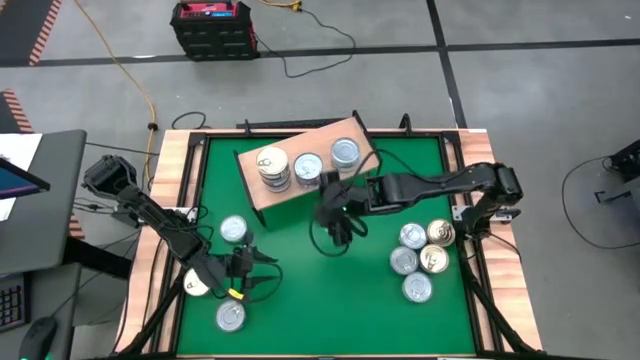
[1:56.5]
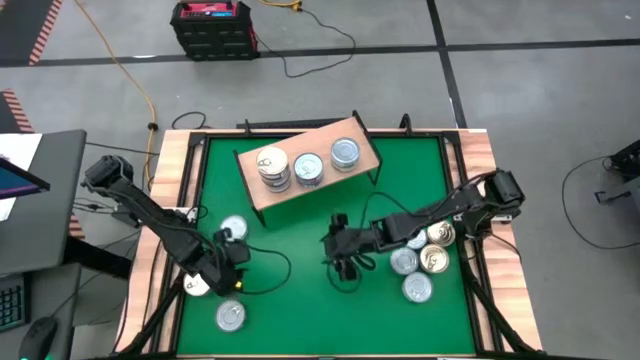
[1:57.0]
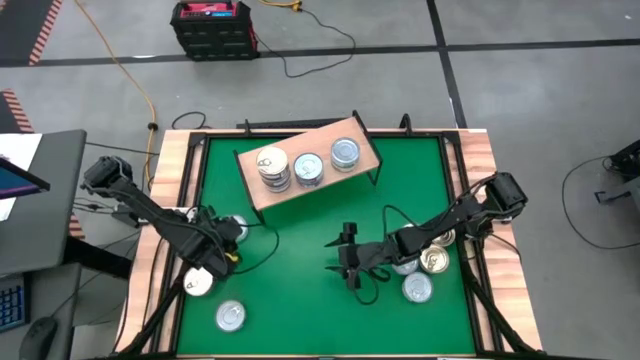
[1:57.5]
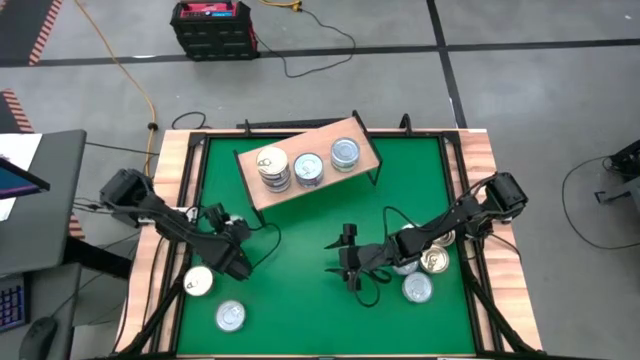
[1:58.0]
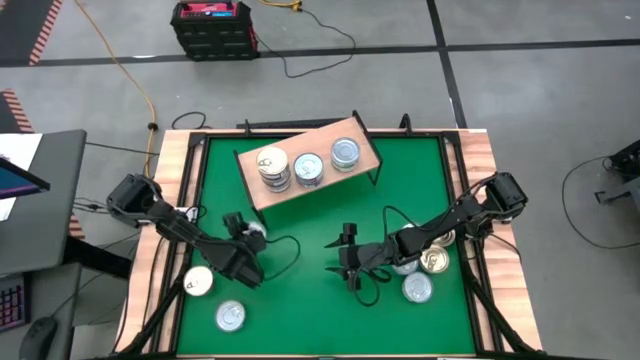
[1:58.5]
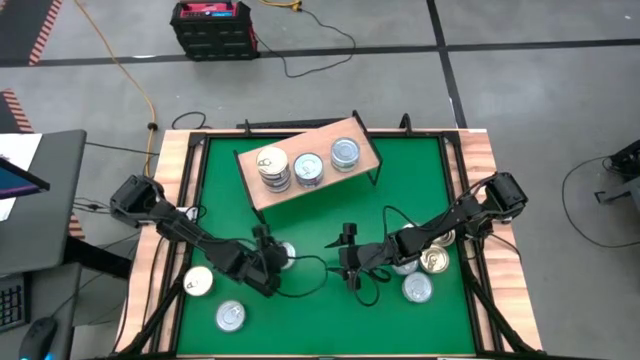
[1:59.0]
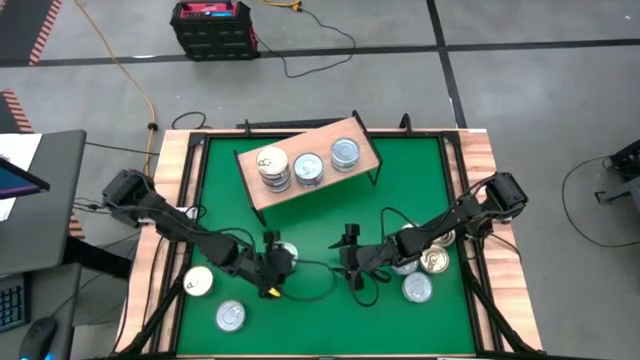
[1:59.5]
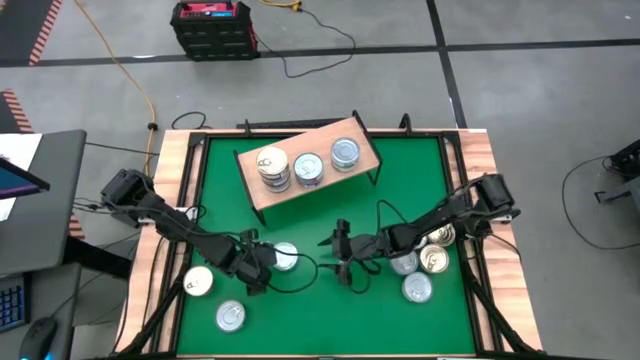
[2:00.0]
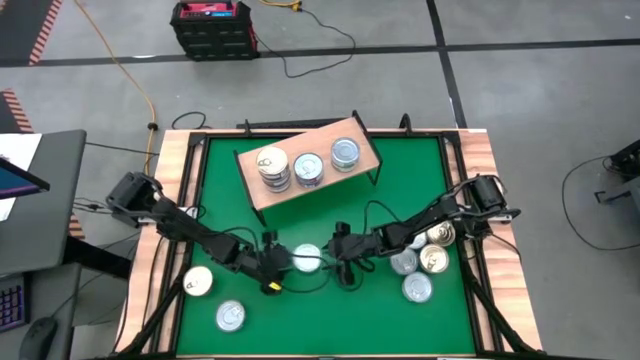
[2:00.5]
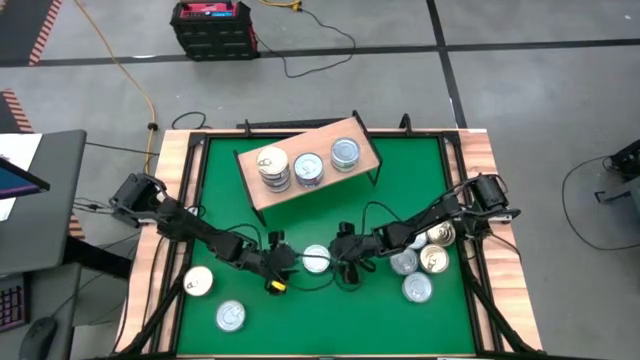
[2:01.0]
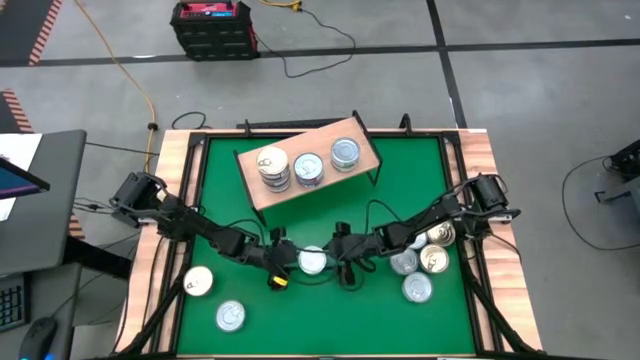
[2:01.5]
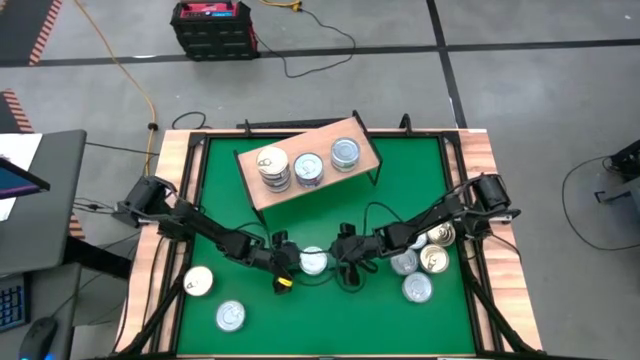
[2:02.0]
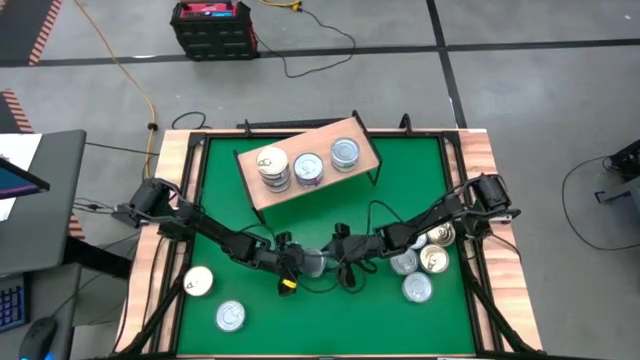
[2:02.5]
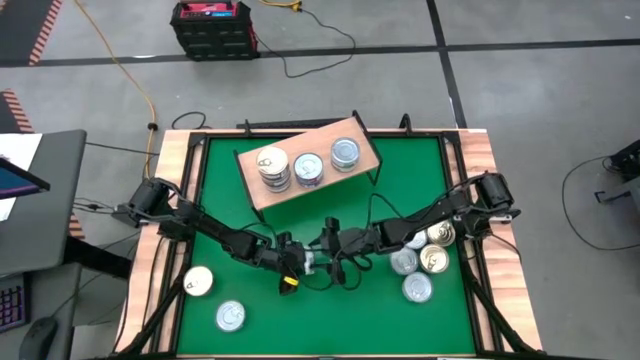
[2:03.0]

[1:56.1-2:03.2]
Task: Stack canned seafood by type on shelf
Stack the green white tuna can on top of the green white tuna can on the shelf

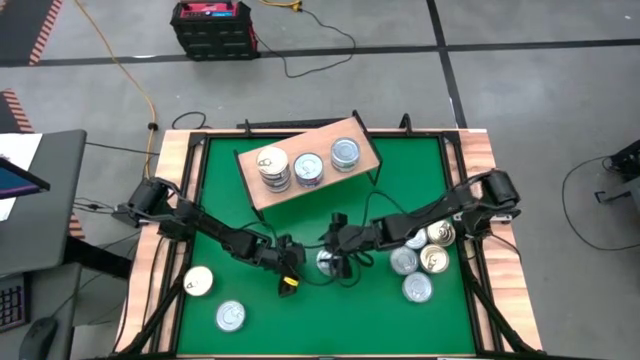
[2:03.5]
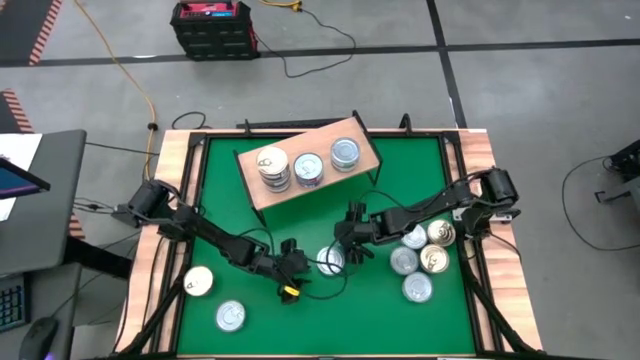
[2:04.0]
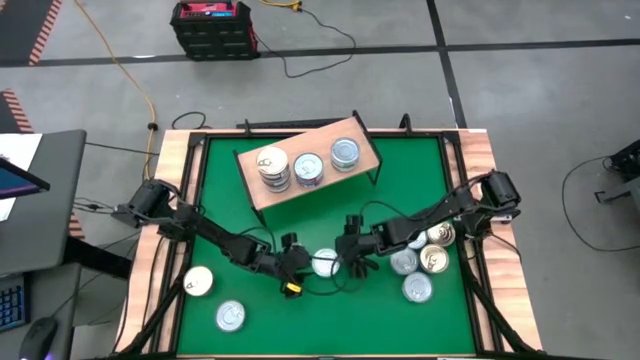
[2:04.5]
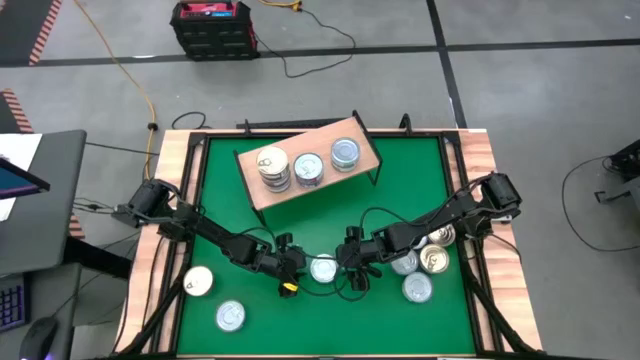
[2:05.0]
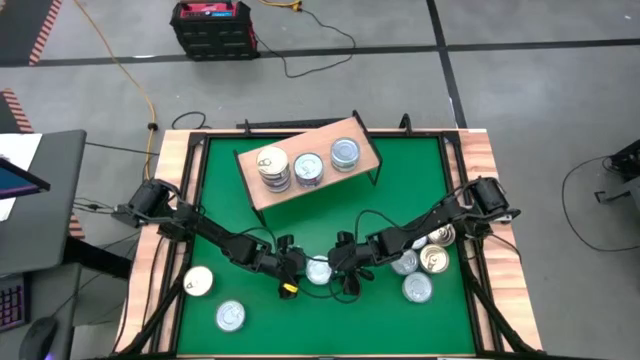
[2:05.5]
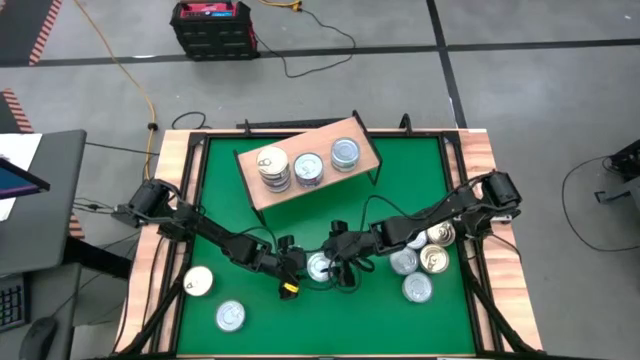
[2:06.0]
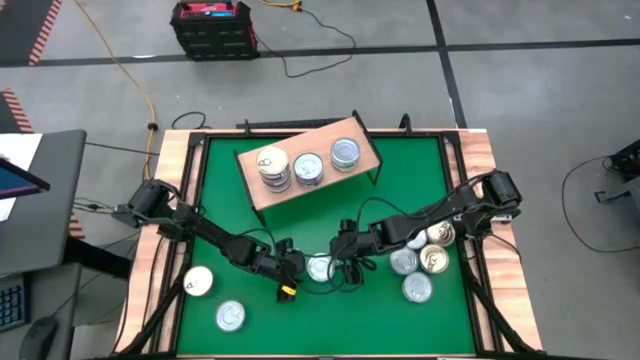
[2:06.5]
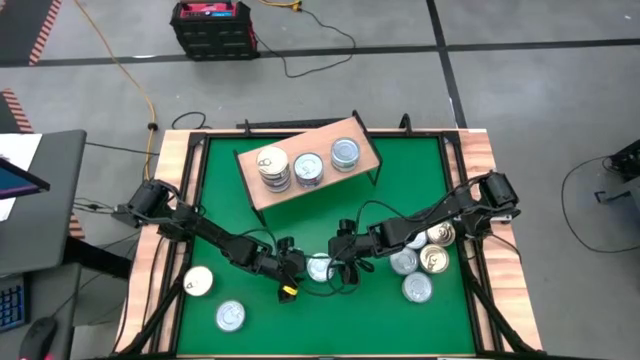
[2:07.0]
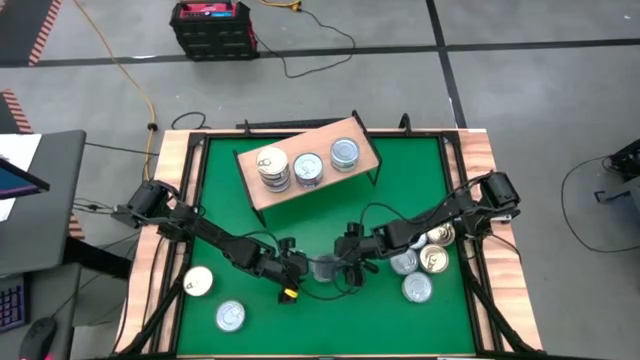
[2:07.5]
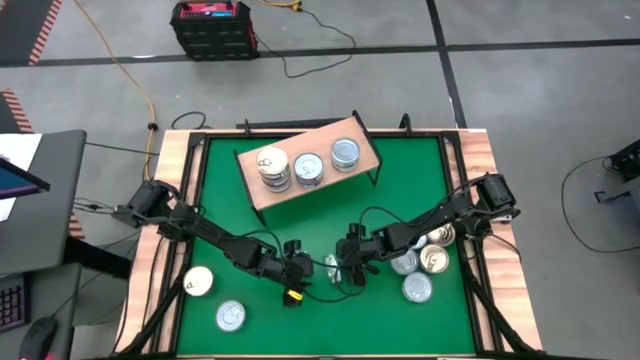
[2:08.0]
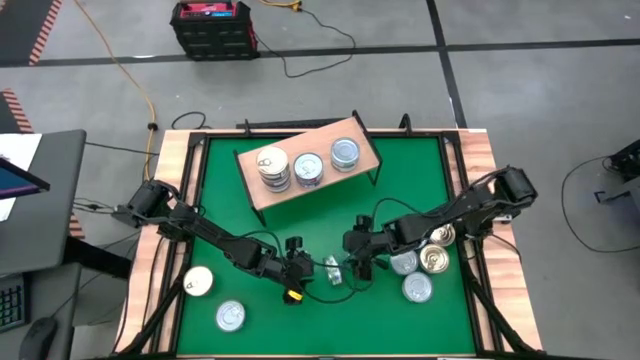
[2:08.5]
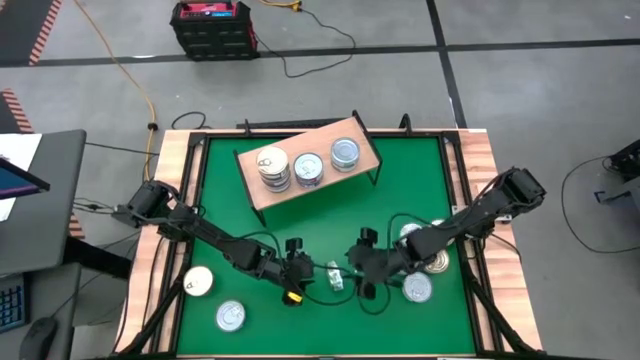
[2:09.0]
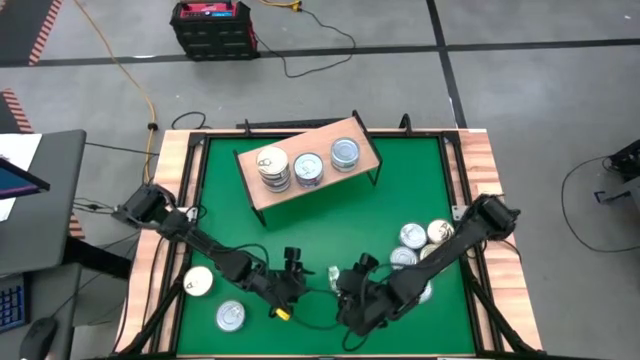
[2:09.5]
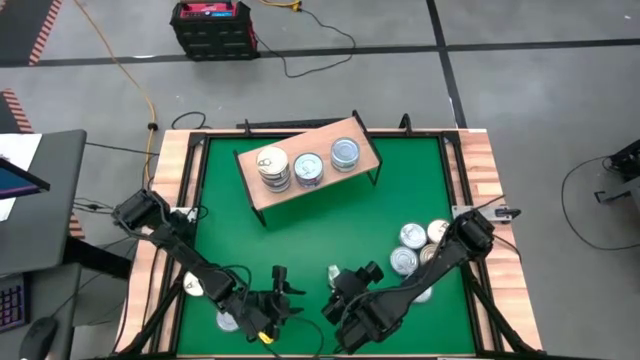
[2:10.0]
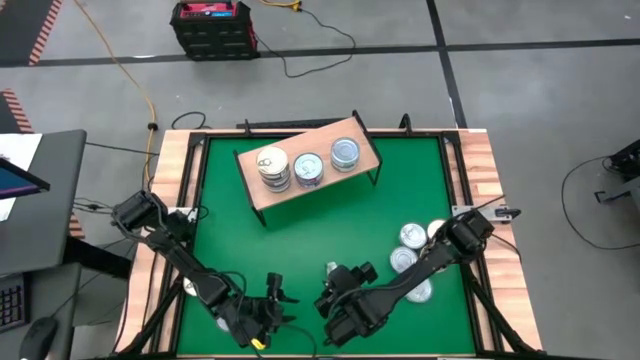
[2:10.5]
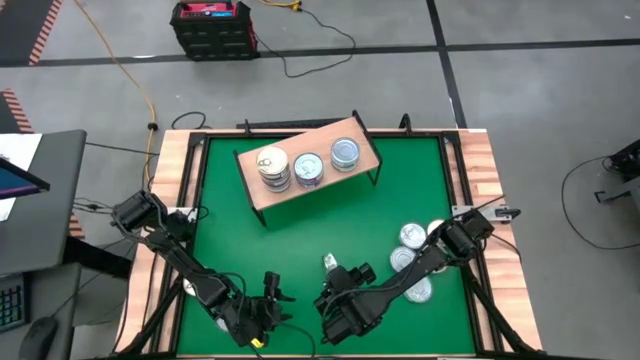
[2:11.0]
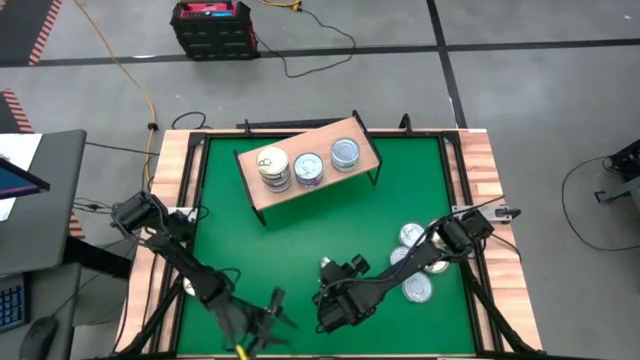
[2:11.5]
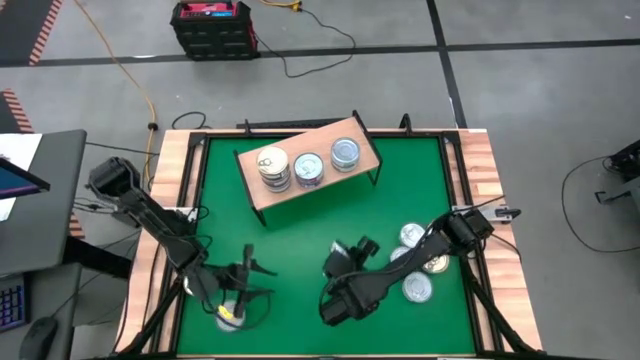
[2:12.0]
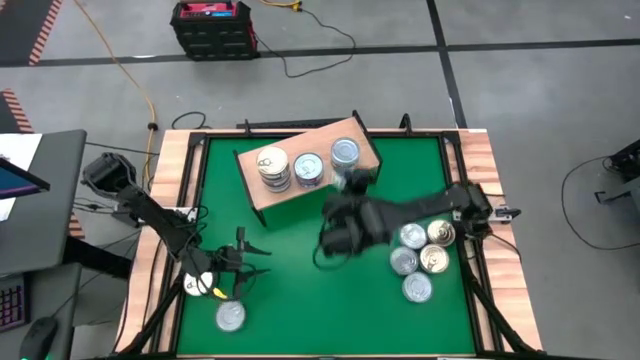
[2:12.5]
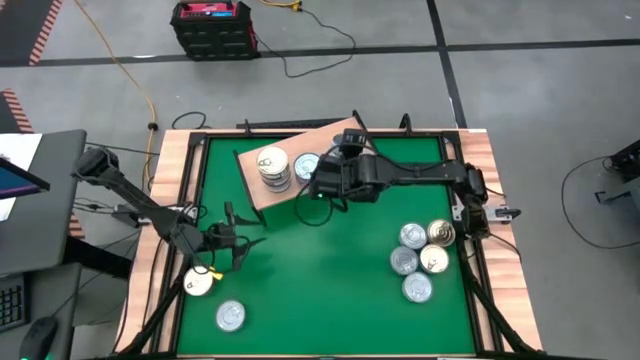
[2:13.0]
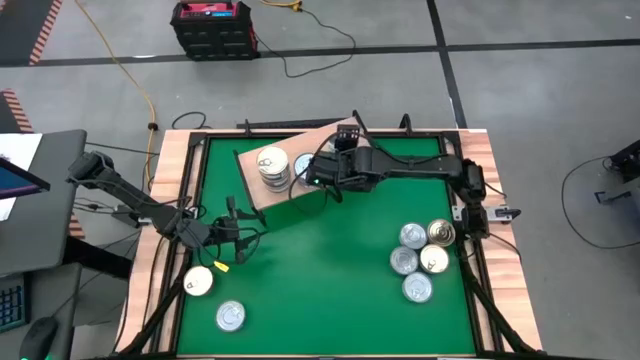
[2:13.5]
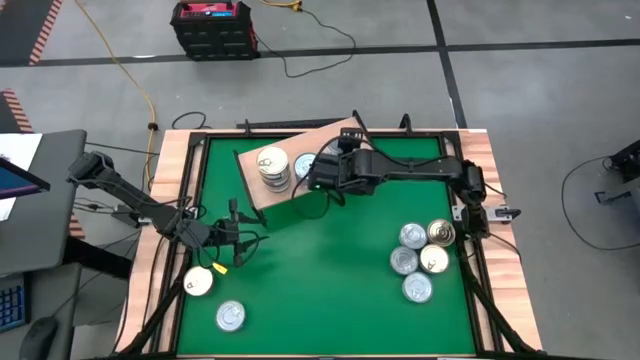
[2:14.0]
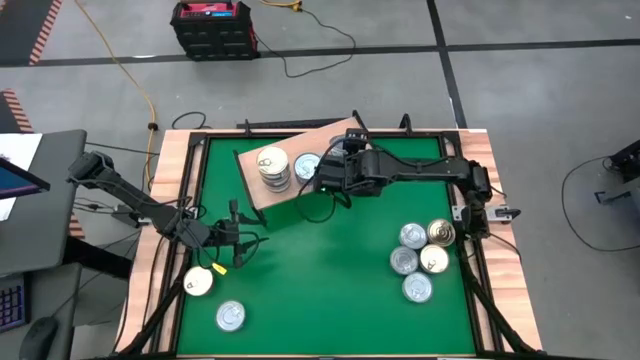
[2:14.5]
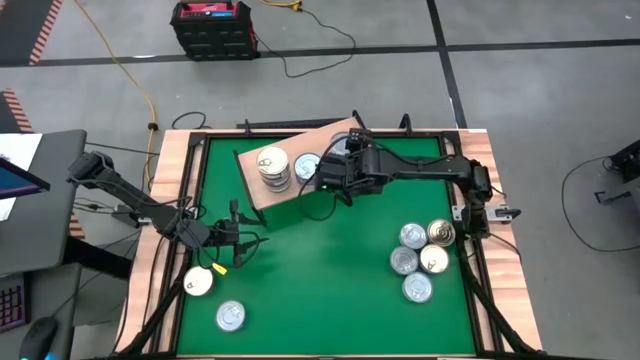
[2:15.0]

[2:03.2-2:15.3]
Stack the green white tuna can on top of the green white tuna can on the shelf

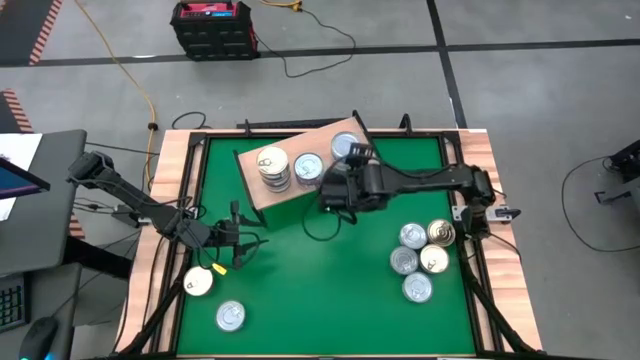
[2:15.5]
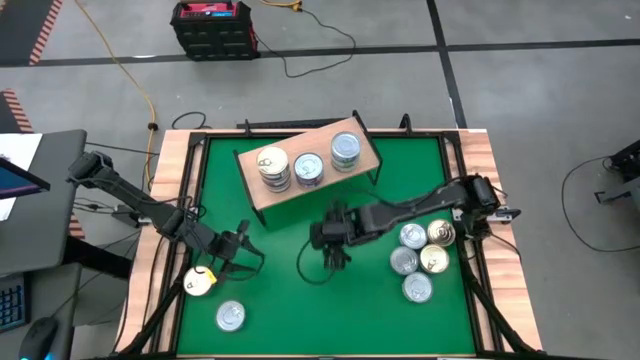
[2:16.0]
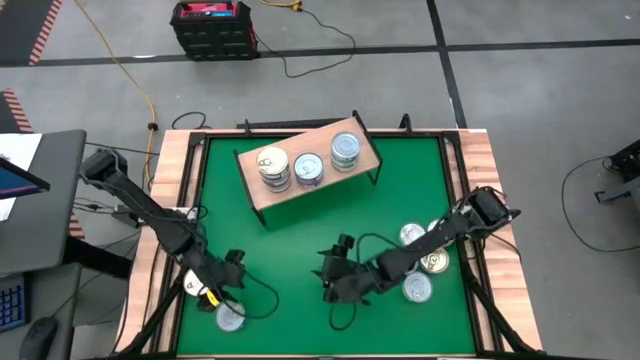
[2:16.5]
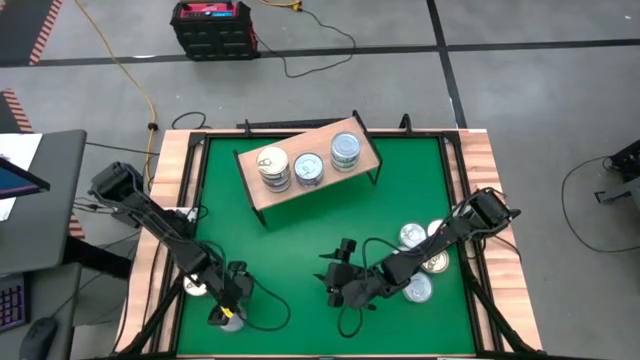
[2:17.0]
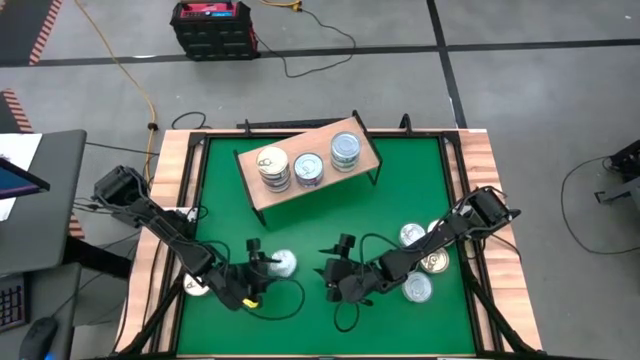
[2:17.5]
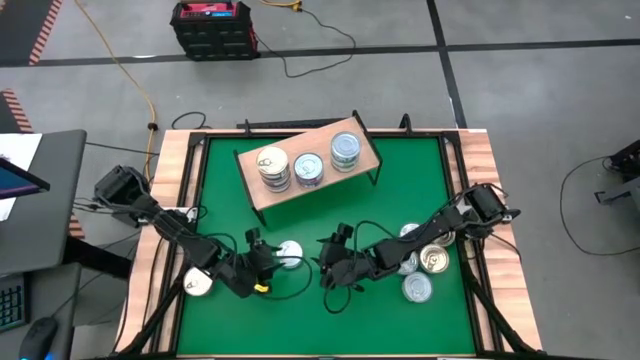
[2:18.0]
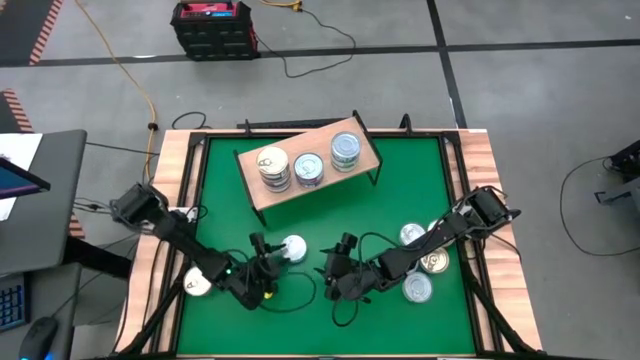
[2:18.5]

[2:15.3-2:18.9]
Stack the blue tuna can on top of the red tuna can on the shelf
